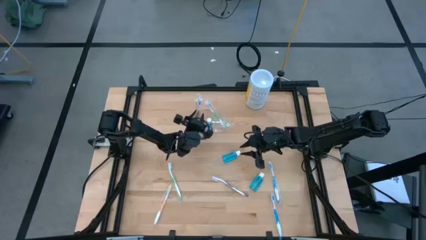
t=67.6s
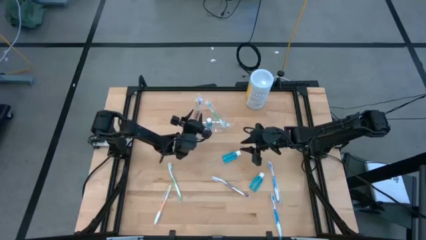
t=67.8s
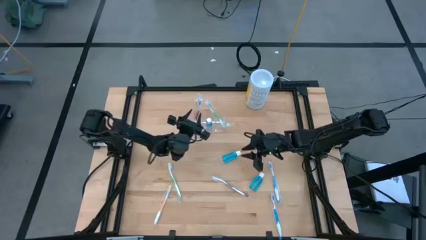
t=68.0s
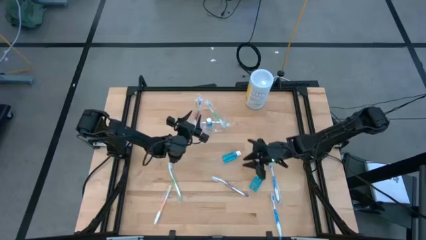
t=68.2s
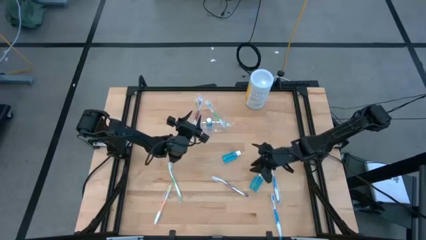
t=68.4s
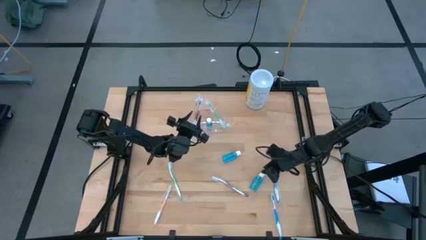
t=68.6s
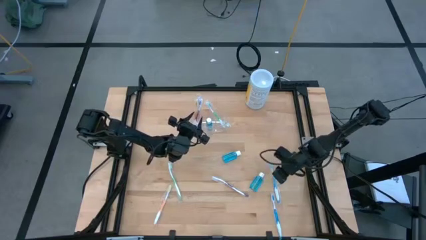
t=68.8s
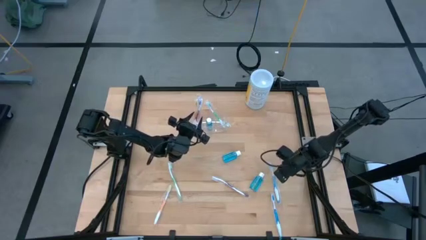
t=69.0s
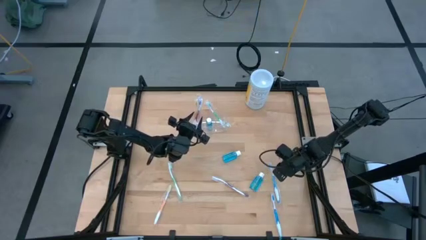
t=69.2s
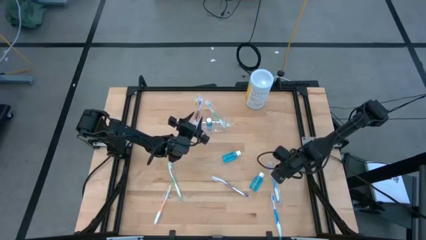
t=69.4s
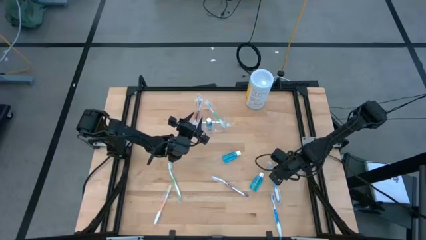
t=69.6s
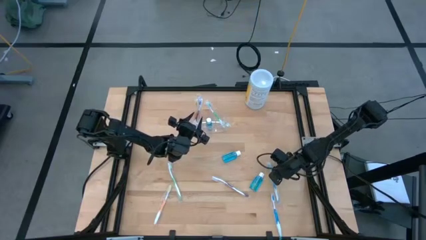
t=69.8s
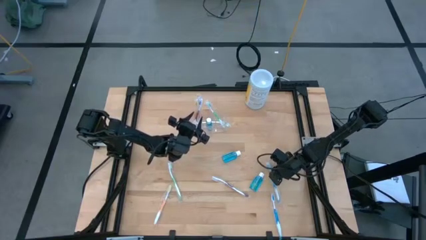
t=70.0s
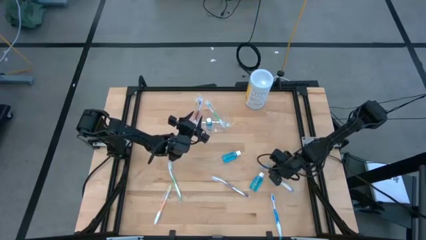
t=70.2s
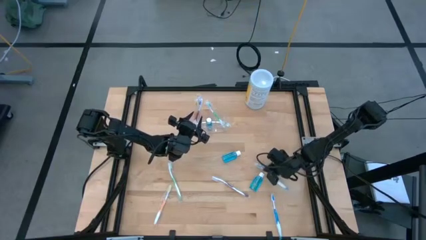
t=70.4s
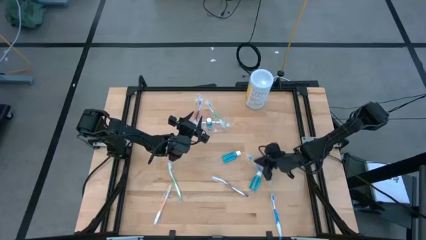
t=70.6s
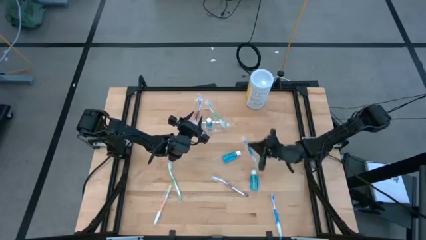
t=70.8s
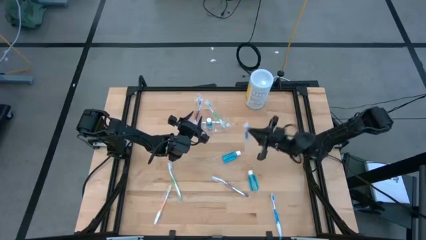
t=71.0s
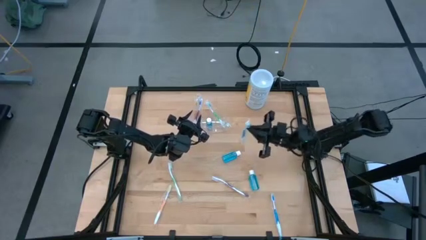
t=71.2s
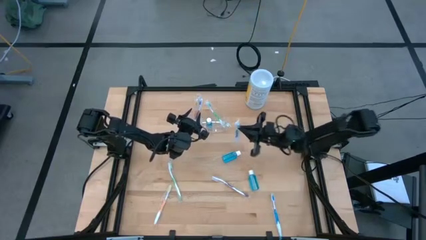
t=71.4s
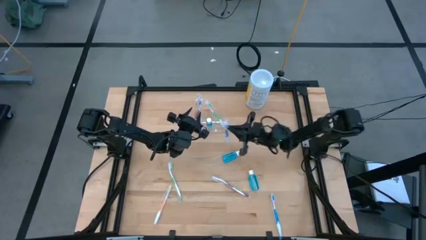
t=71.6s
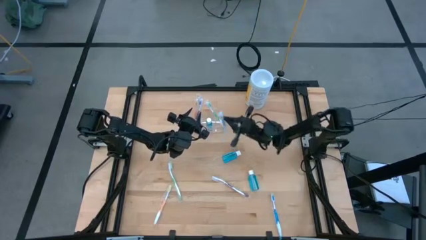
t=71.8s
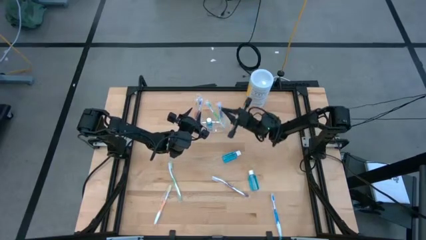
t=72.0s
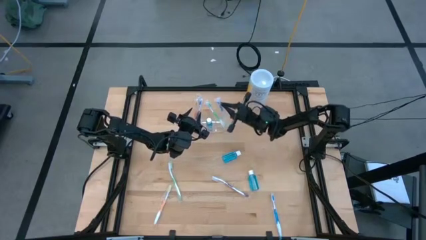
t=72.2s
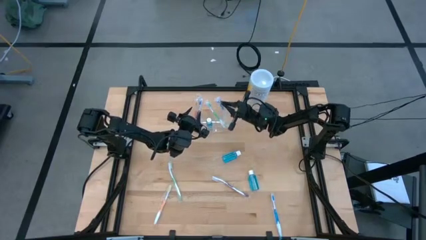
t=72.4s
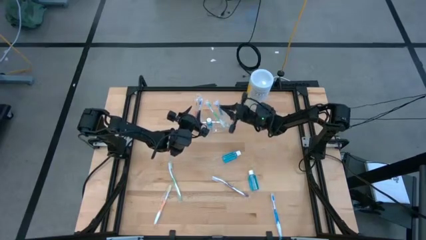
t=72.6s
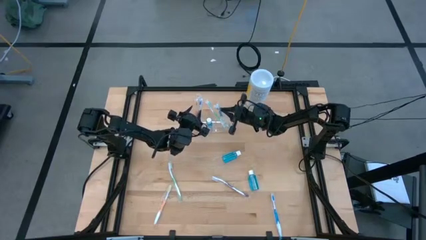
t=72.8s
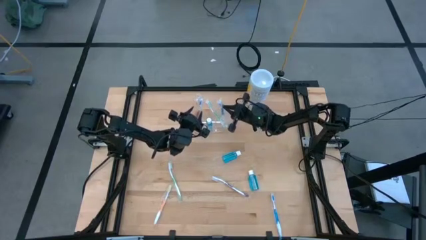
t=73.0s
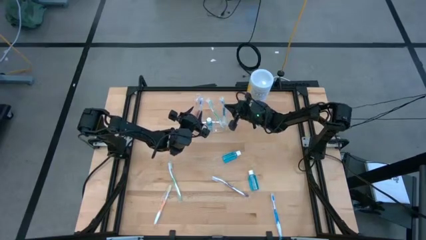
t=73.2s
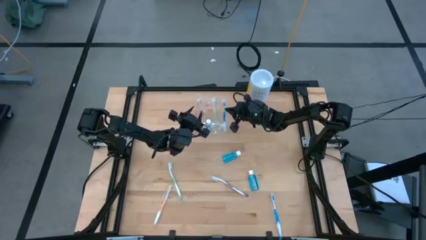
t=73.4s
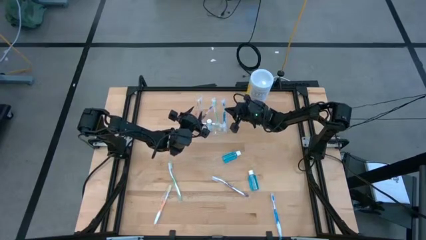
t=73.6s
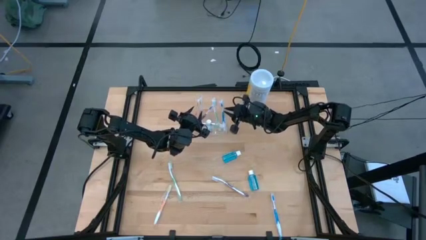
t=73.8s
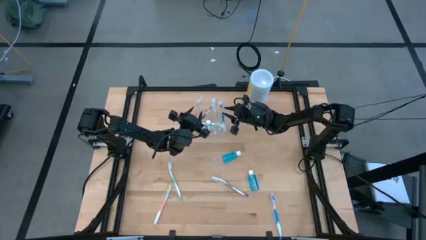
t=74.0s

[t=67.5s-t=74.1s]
Task: Pick & Place toothbrushing station
Put the top blue toothbrush into the transparent organizer

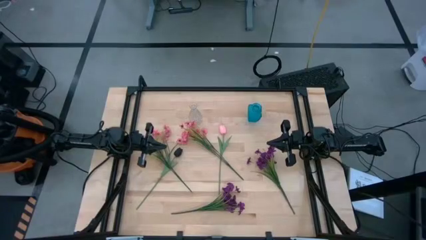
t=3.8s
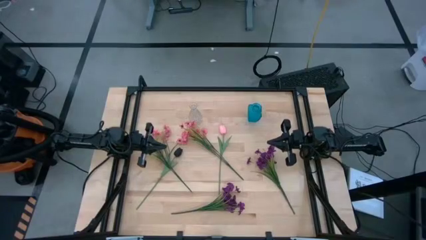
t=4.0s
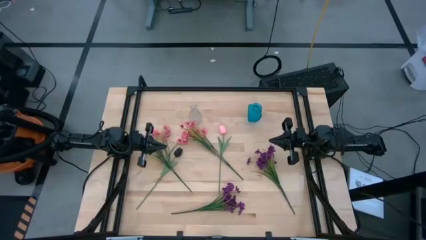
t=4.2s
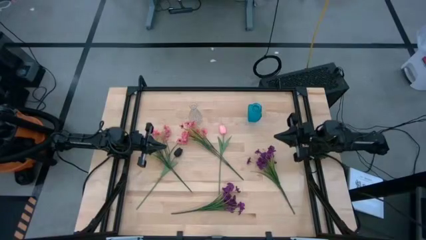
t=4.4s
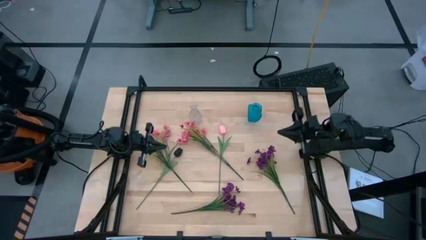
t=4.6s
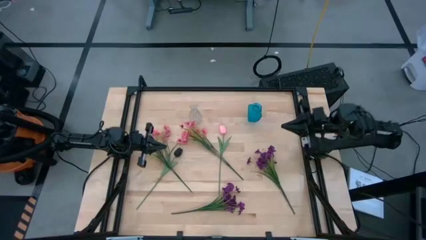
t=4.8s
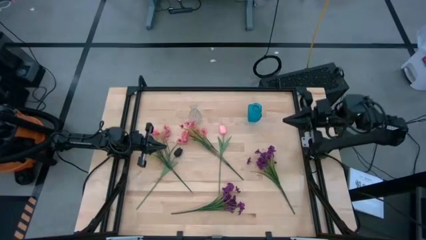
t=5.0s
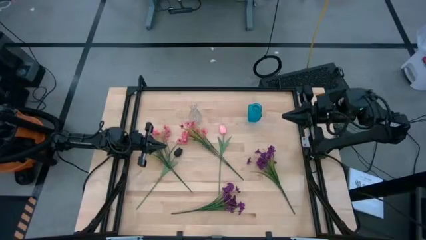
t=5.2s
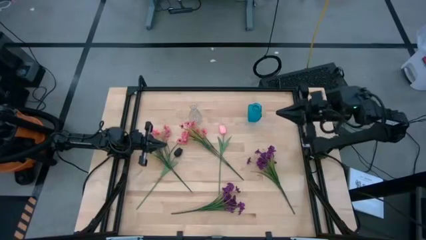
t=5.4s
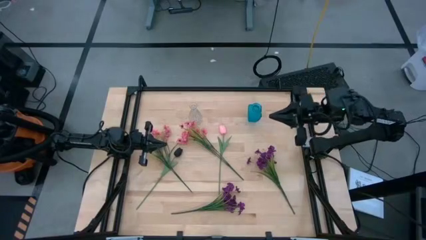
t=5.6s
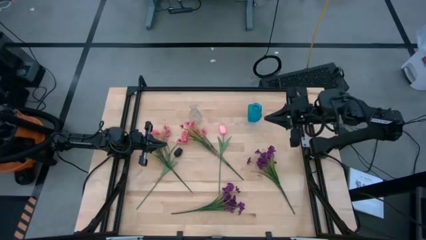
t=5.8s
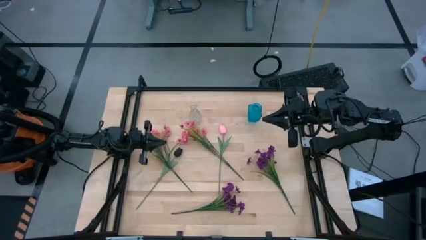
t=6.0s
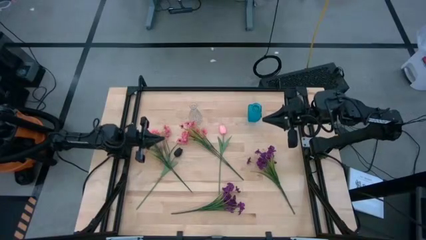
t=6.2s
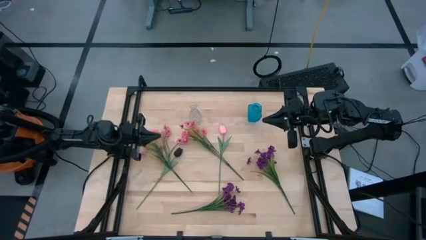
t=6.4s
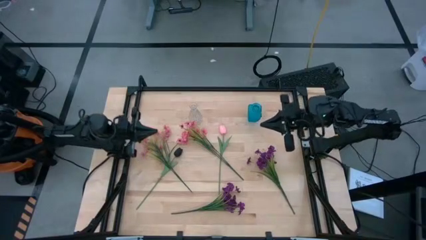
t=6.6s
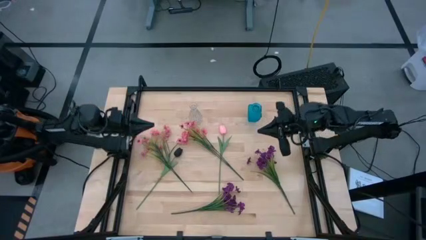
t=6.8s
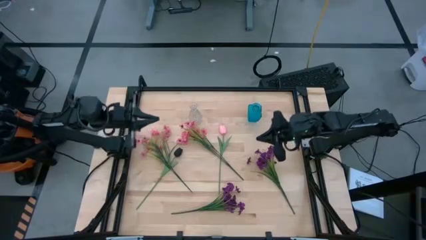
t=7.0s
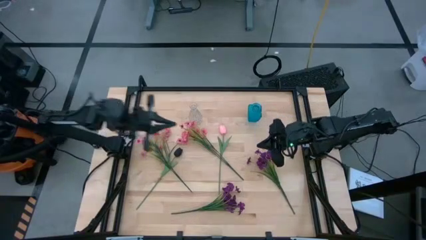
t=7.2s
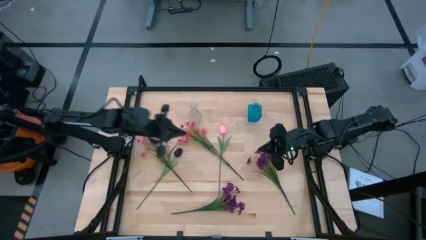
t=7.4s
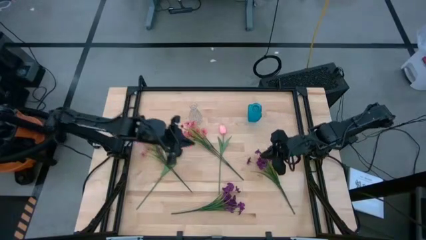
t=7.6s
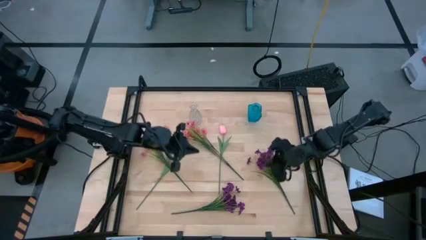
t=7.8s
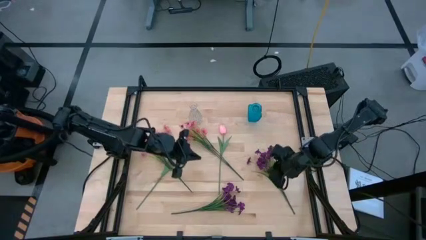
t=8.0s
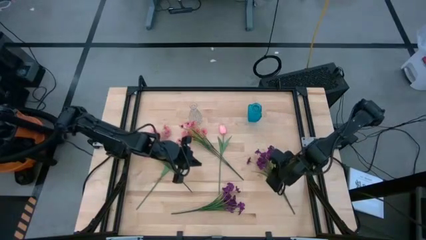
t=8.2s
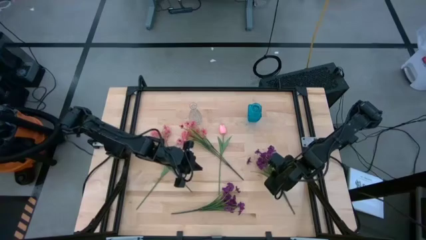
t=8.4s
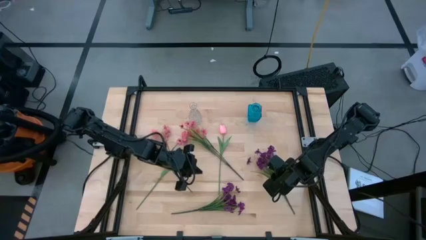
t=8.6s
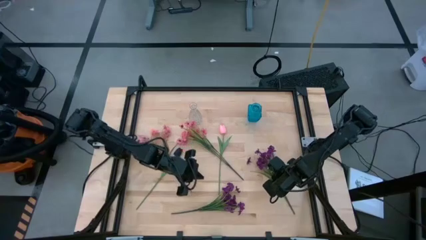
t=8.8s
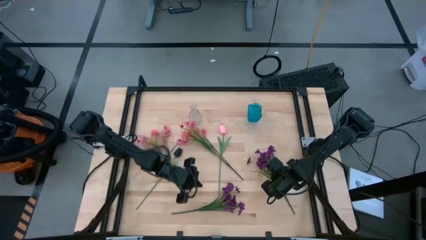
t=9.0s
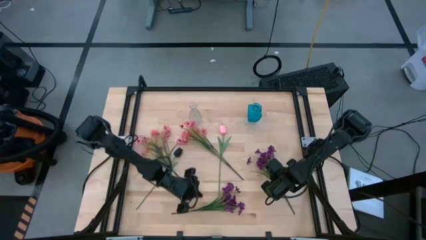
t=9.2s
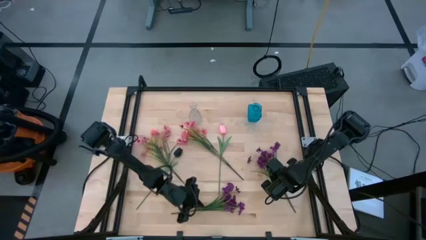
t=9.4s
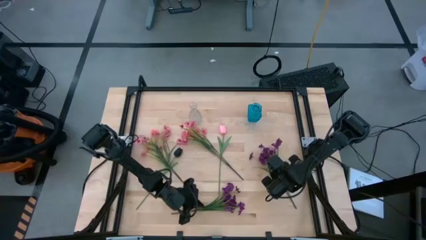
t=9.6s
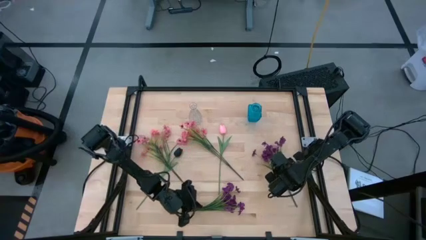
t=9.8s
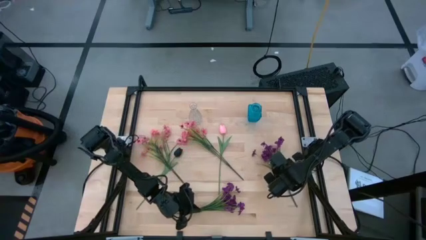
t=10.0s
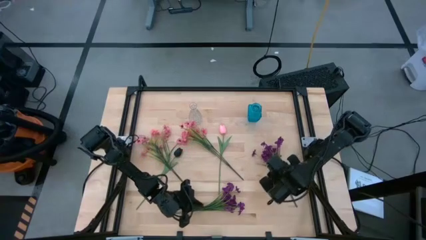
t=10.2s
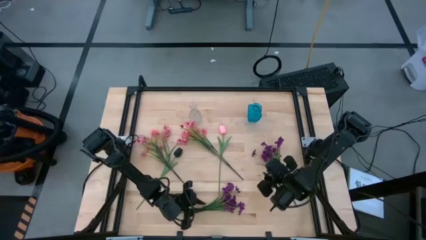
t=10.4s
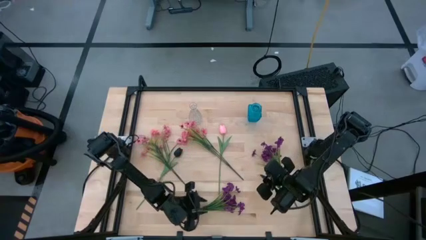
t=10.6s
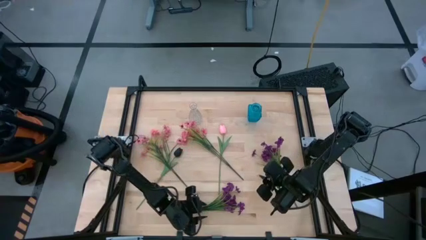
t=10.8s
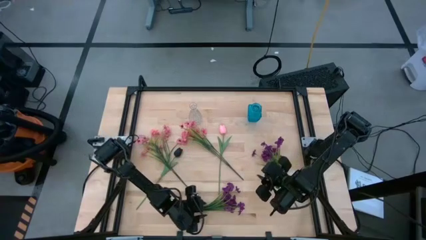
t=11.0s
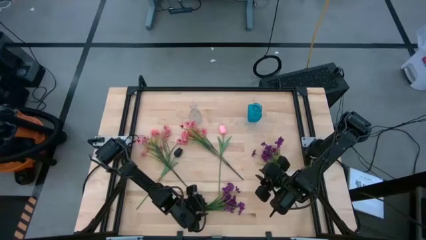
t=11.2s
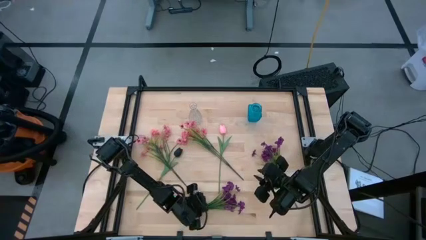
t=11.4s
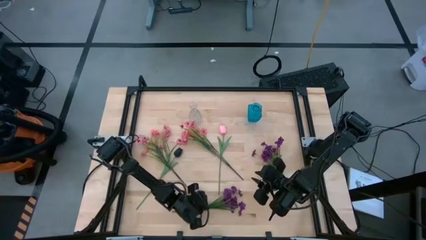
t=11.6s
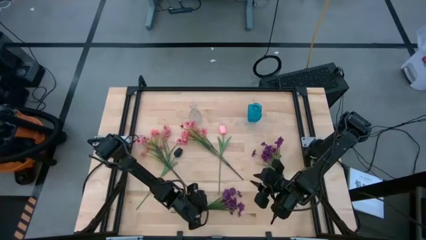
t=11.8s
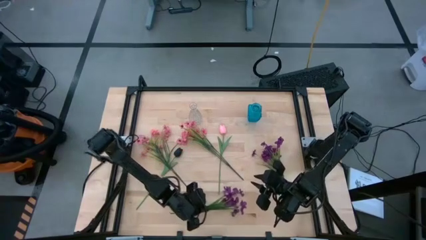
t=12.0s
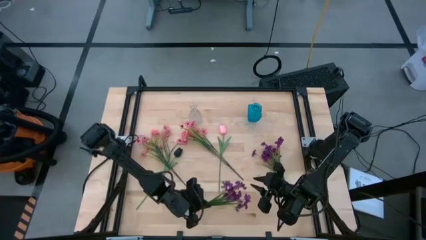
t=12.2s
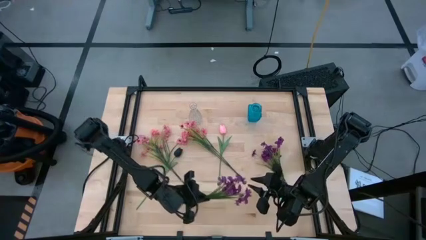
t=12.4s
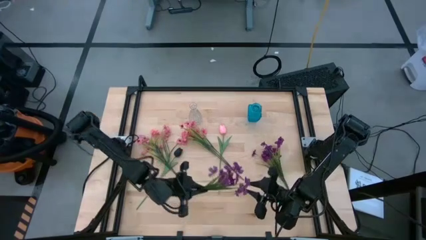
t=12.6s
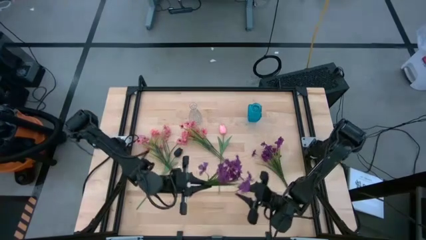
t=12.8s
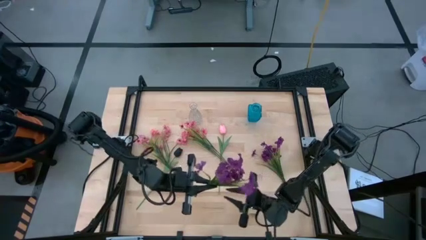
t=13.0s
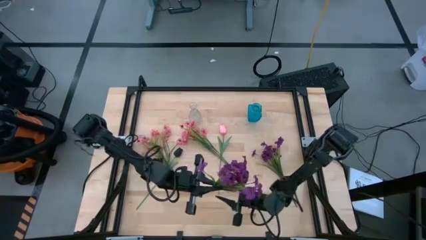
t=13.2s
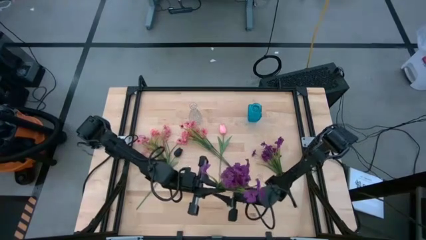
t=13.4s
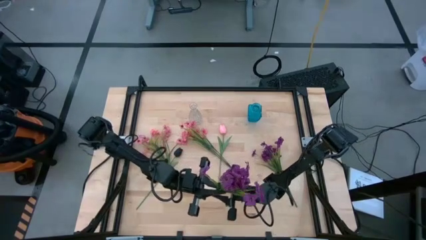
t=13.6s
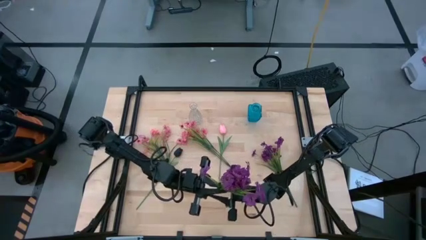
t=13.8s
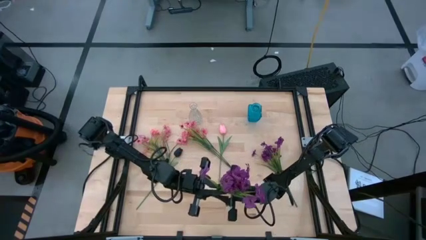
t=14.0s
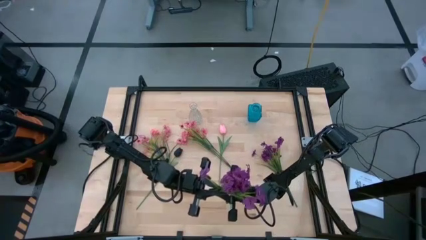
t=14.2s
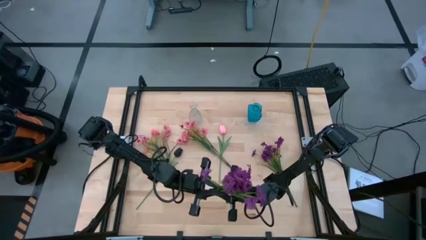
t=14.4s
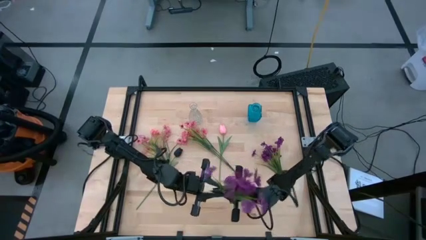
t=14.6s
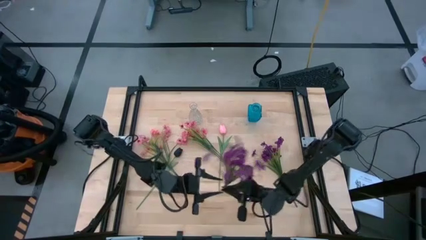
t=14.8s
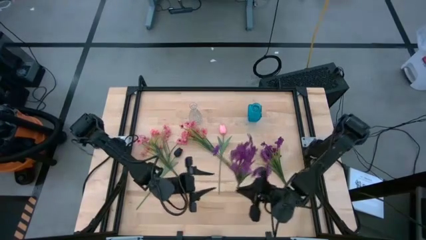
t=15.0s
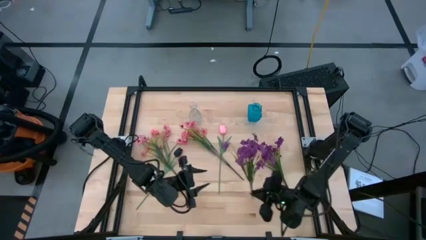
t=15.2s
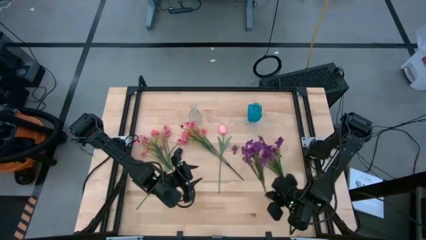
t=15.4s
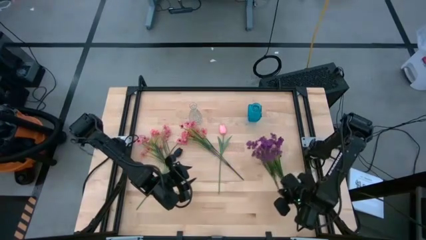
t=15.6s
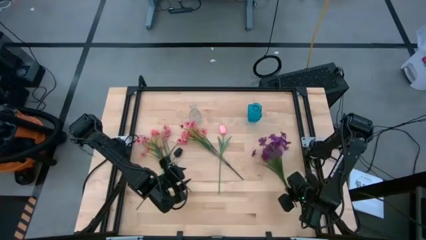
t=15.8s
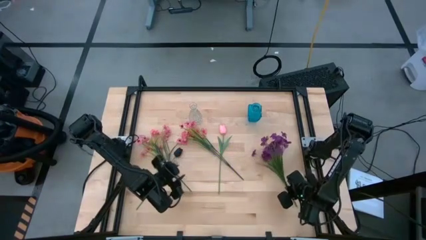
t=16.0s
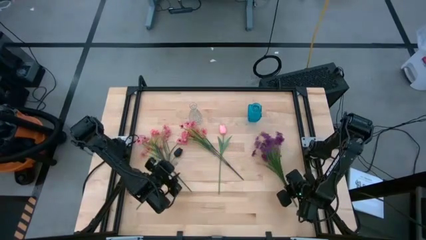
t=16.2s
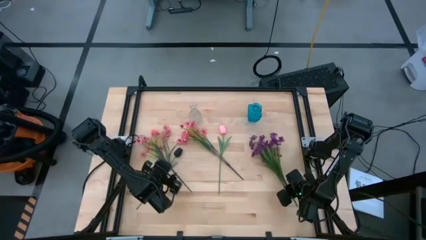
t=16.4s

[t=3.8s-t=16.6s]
Task: Sort flowers into vase by color
Move the bottom purple flower to the middle right of the table
